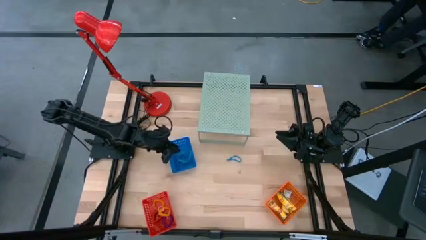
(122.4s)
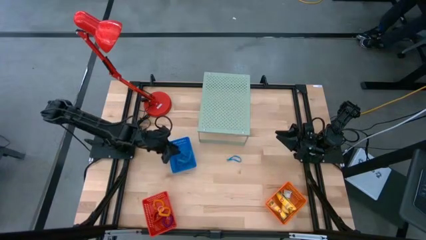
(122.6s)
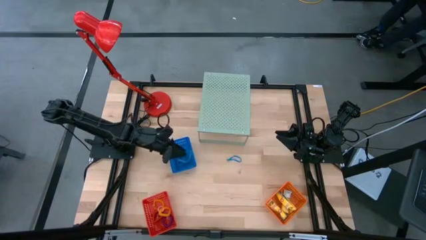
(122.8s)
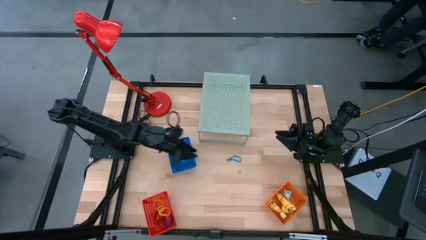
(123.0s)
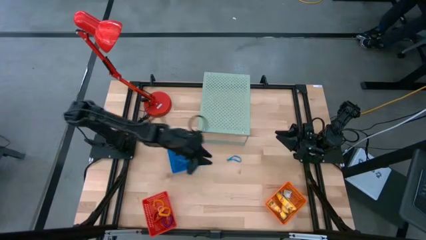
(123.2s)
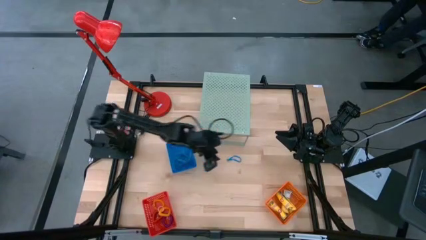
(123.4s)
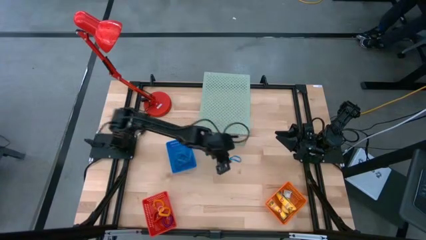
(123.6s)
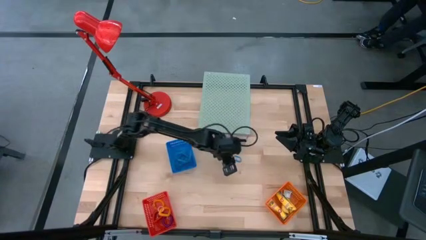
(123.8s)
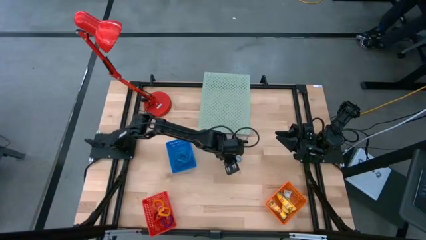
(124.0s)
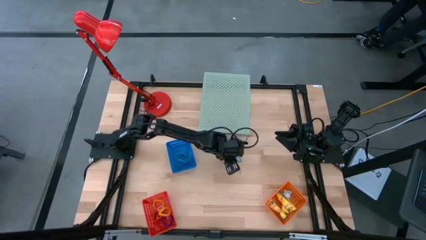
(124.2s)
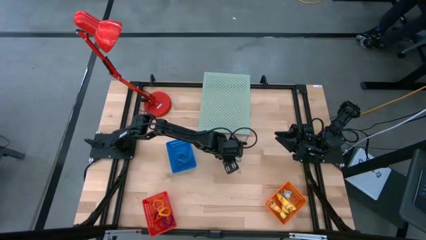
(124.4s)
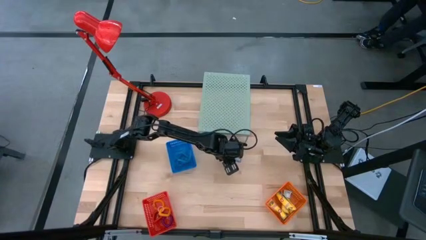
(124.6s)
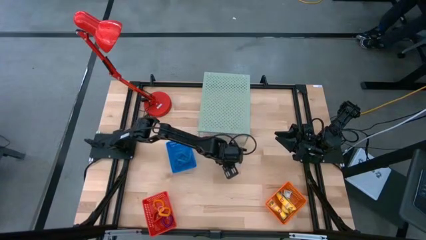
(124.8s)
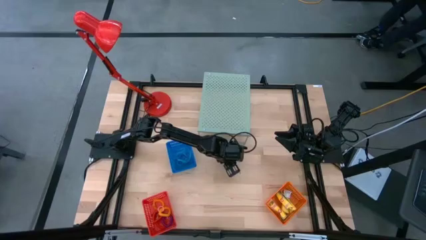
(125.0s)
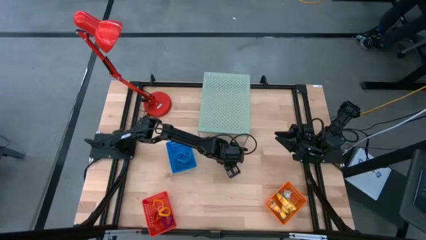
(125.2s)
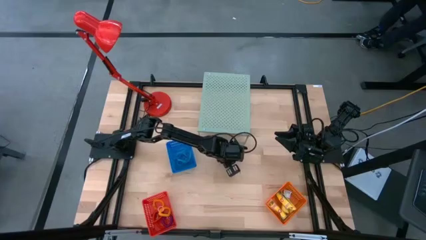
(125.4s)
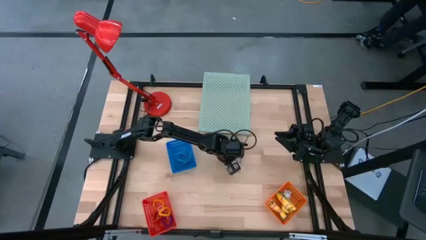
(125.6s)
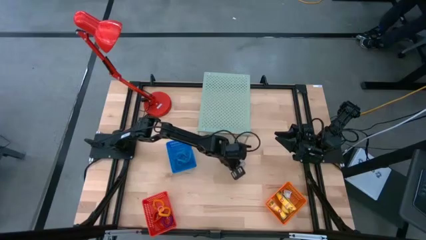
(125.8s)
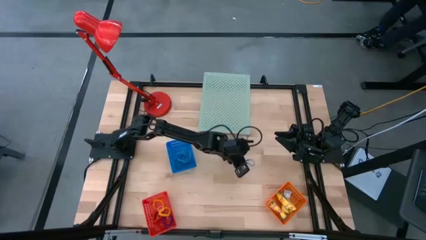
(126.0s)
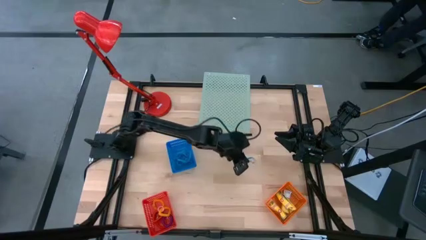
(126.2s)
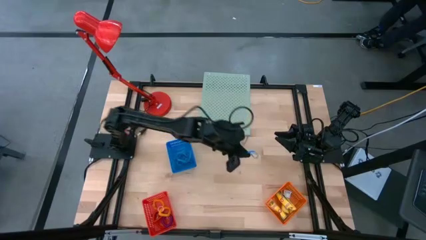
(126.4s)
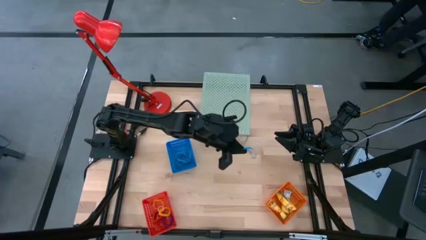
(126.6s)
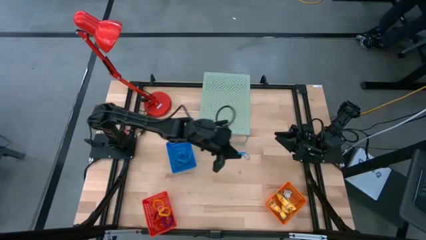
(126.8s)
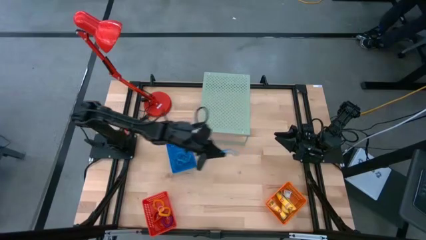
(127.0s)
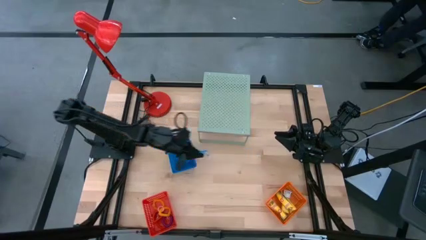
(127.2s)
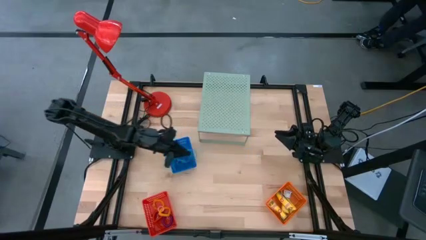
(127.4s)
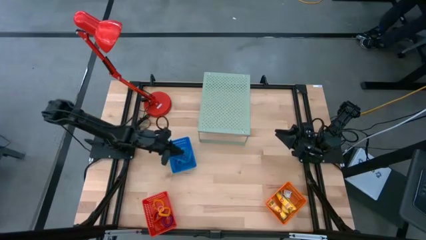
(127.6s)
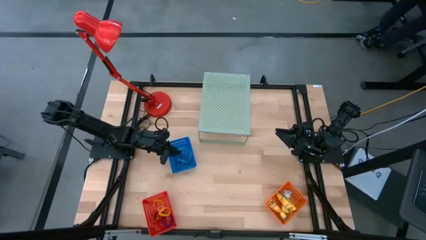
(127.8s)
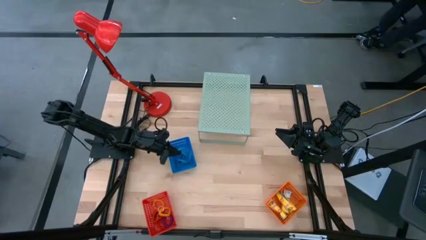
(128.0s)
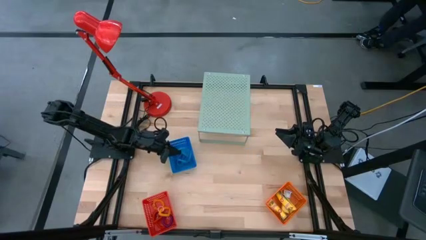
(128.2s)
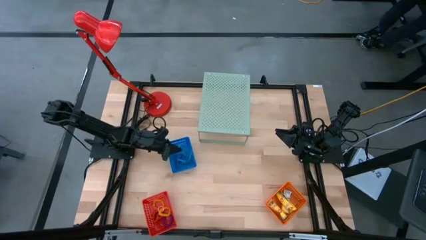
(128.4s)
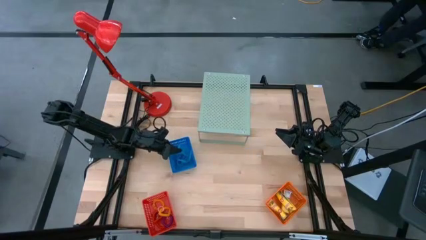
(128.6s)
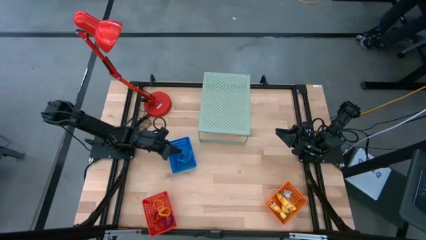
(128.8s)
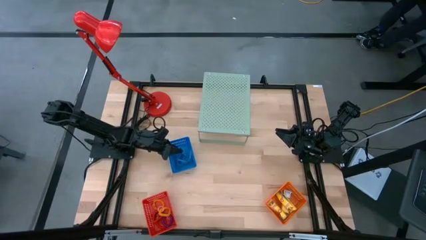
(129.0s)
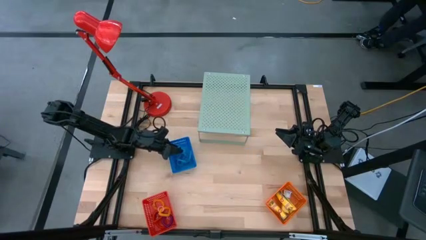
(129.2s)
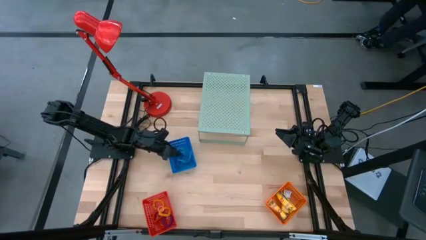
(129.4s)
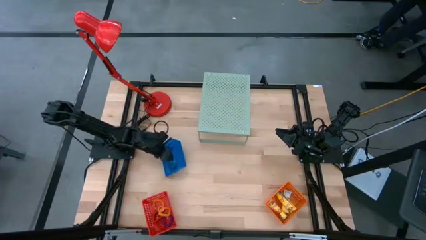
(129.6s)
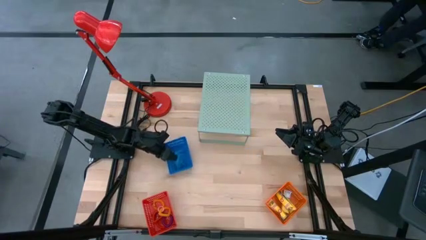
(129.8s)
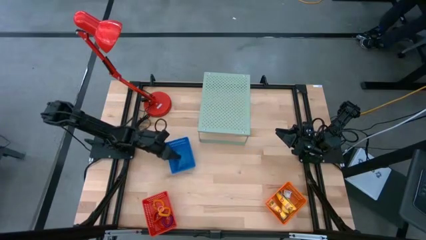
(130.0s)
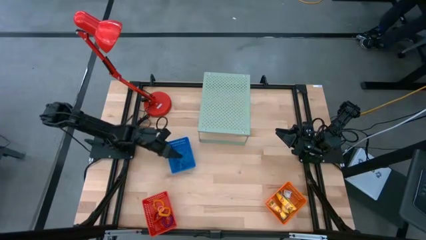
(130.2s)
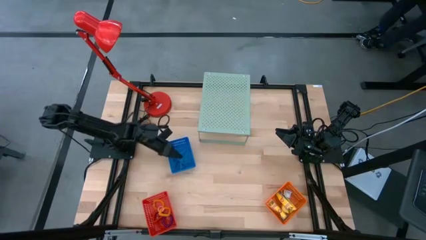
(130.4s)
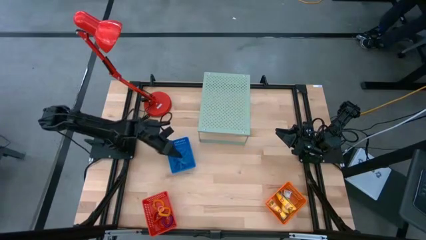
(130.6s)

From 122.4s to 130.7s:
Task: Pick & Place Office Desk Supplies
Put the blue rubber band into the blue basket

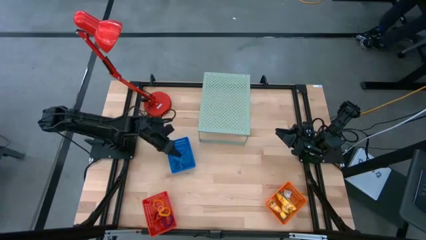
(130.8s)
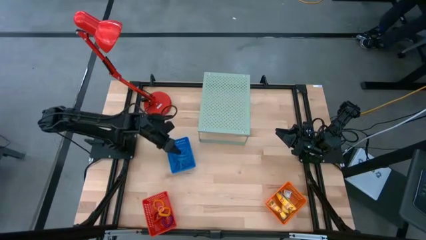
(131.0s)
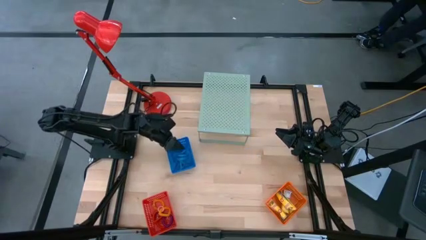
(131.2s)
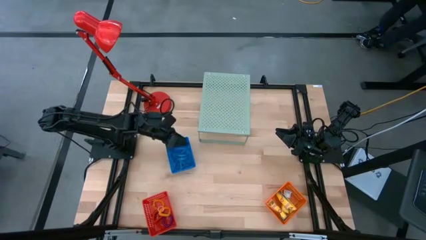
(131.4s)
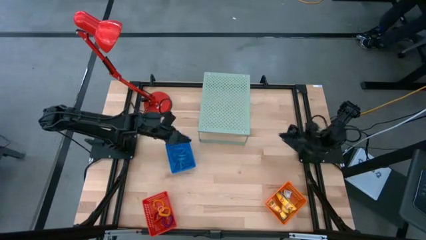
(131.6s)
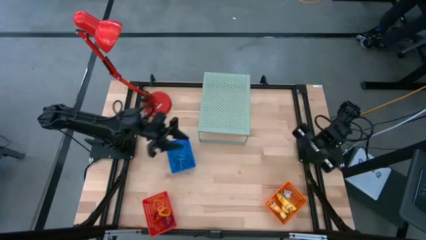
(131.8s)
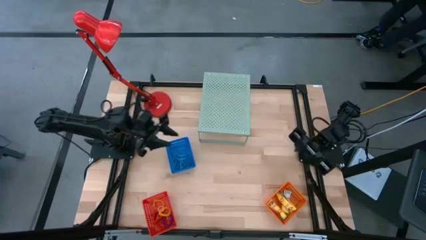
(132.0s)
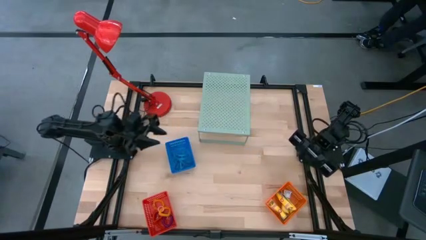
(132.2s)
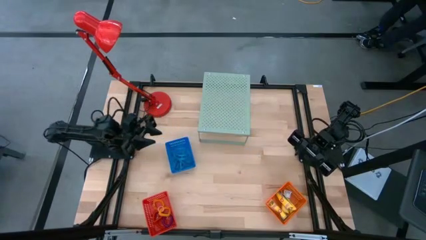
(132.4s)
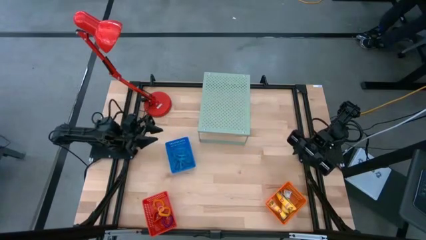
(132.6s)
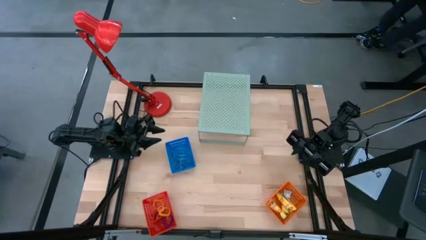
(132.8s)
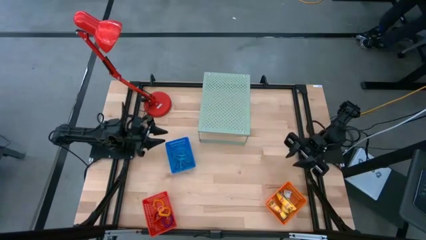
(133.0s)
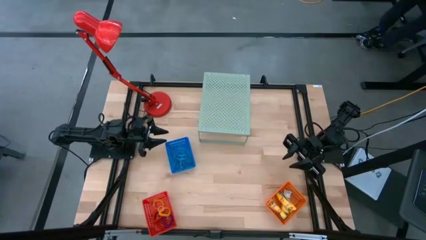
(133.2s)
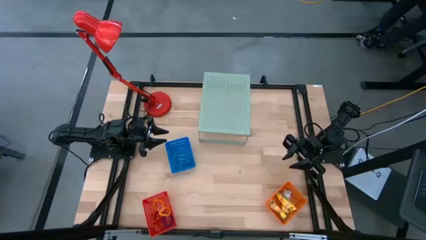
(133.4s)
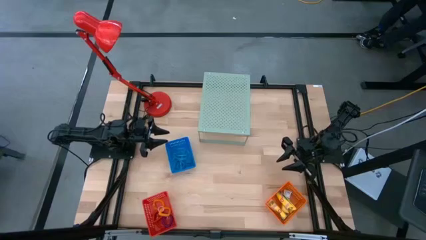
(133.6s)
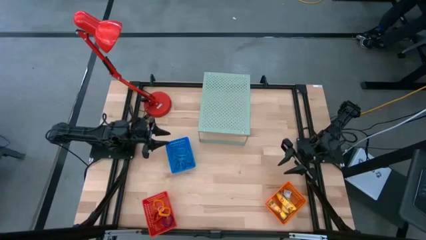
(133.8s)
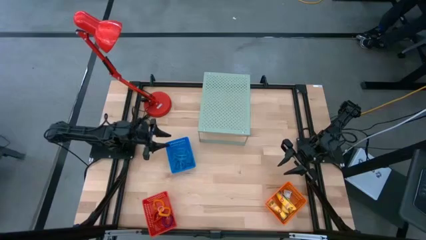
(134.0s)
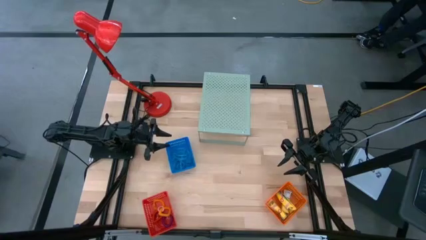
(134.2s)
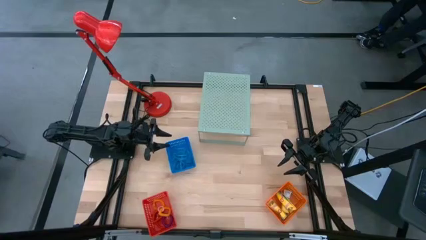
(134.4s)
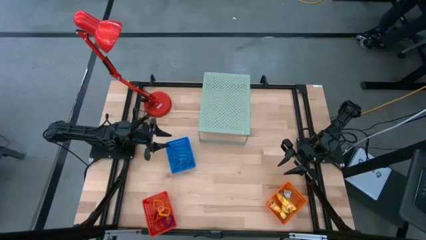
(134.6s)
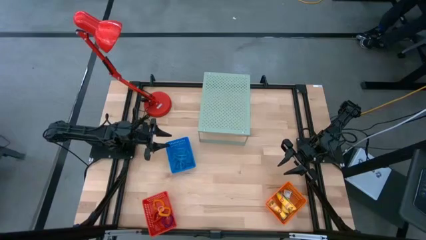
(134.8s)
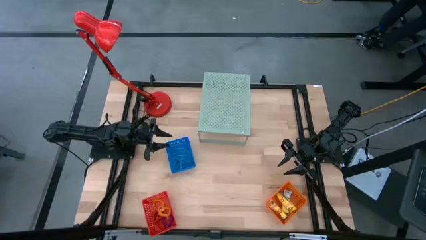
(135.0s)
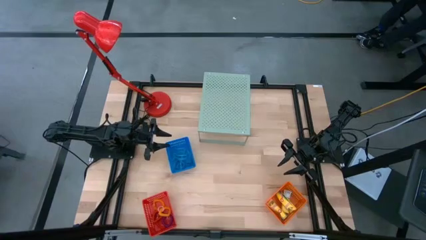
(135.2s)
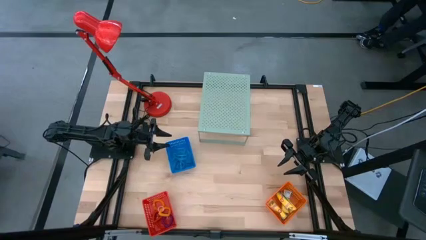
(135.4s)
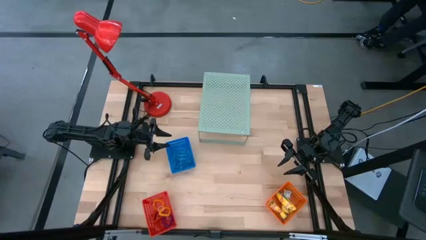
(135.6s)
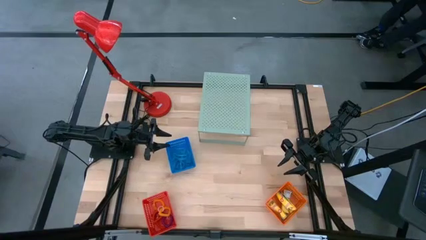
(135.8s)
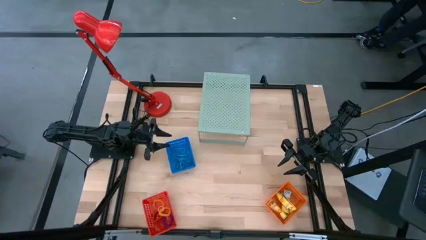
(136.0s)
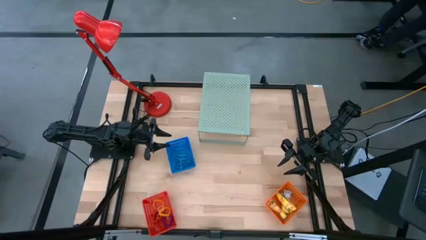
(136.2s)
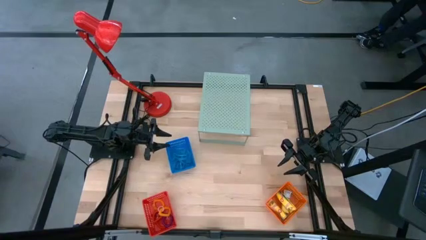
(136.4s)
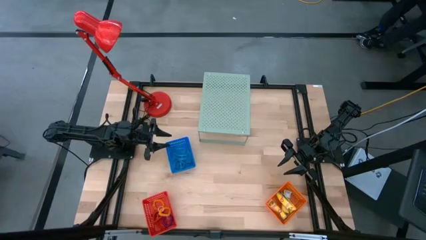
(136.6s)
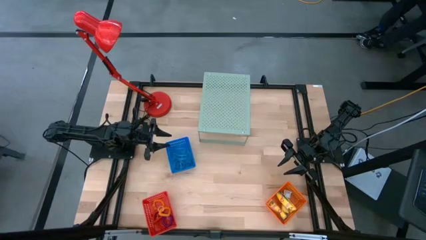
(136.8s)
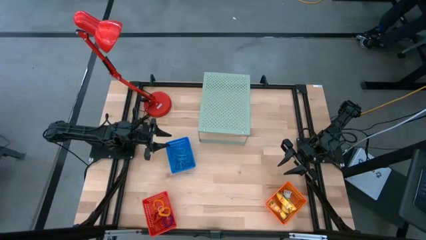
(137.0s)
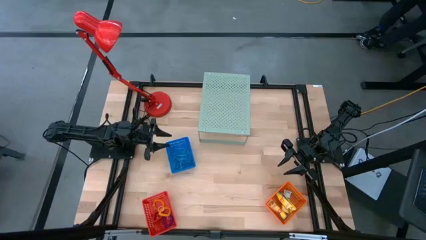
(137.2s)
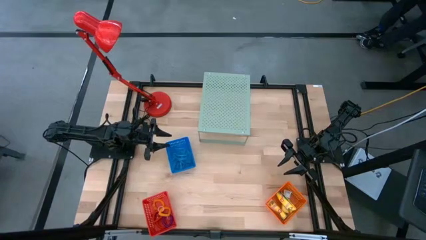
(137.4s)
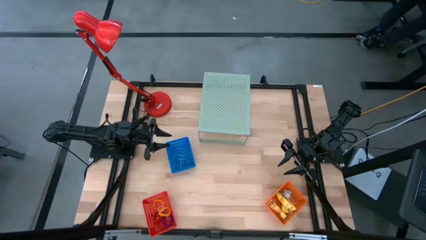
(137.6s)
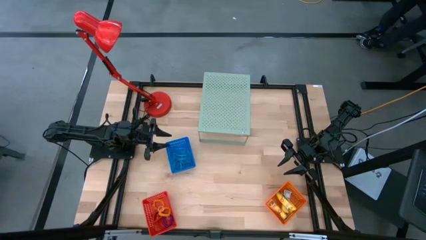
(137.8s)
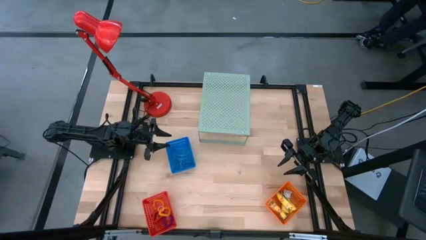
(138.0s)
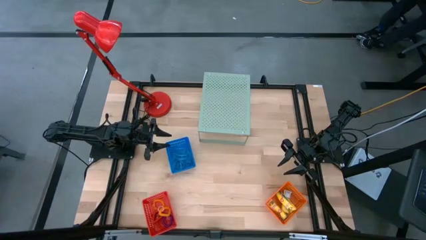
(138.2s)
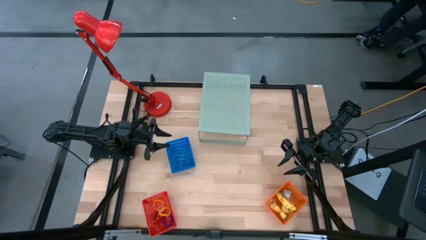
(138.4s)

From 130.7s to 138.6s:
Return to Home Position

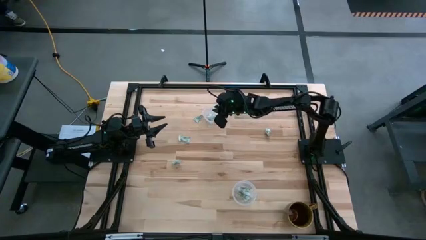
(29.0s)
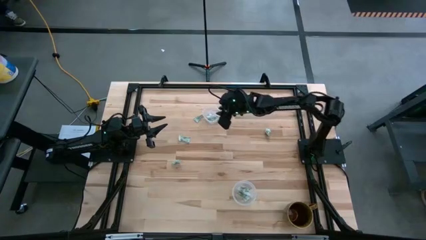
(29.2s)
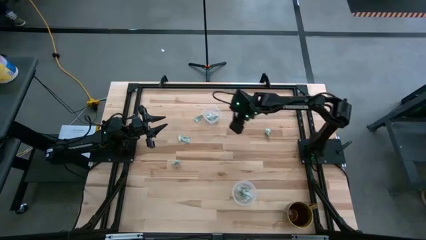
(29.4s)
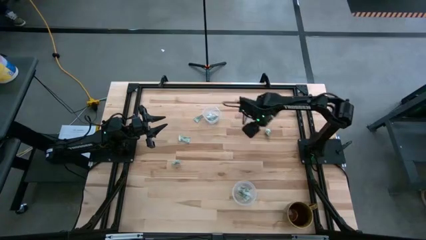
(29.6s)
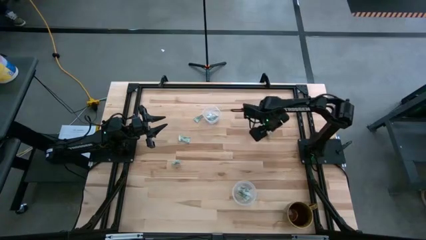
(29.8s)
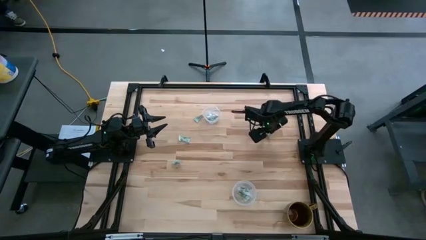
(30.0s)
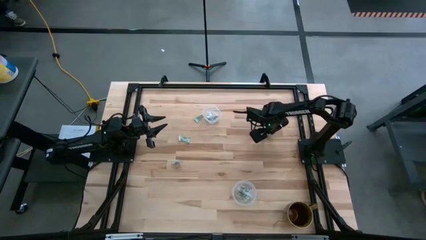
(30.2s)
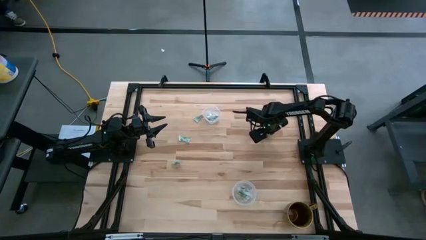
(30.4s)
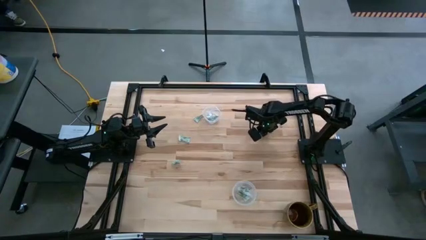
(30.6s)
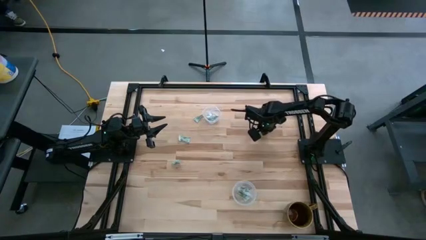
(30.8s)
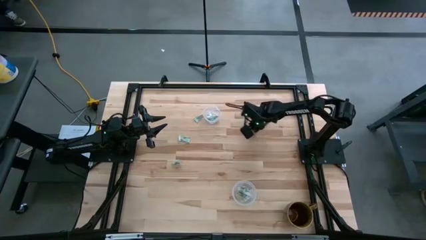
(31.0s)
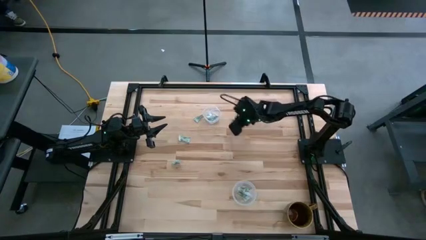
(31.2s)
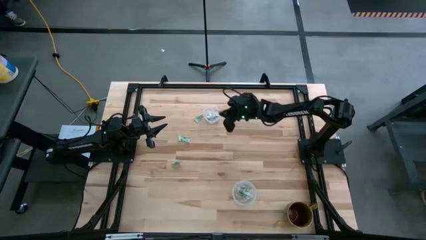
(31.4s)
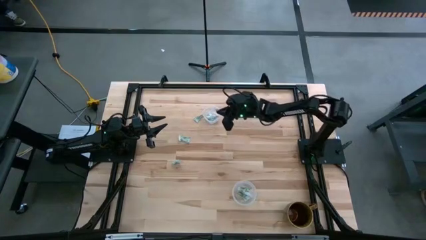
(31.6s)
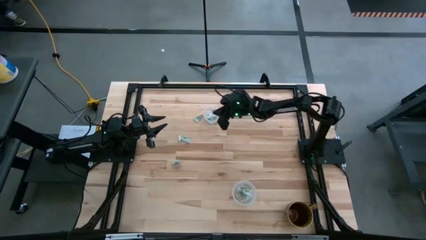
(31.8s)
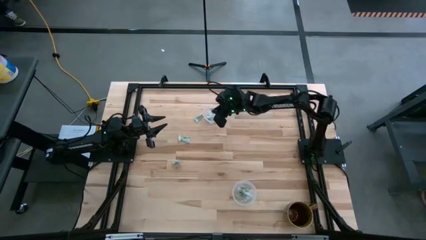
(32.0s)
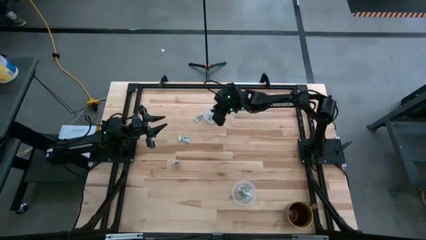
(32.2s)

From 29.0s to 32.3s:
Task: Pick and place Stevia / Truvia into bins
Put the stevia packet into the top transparent container
